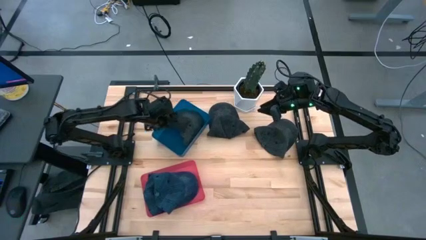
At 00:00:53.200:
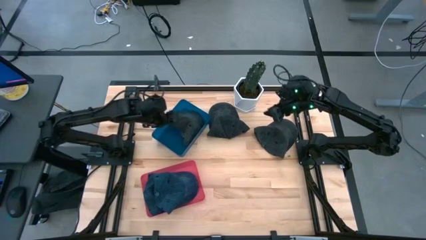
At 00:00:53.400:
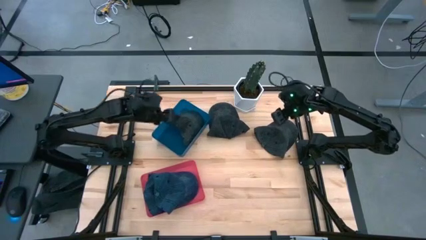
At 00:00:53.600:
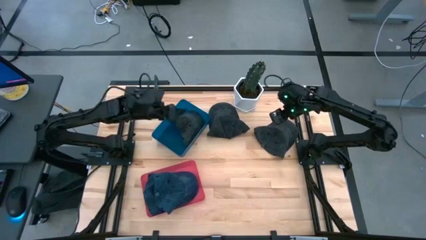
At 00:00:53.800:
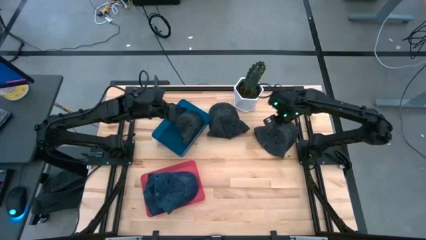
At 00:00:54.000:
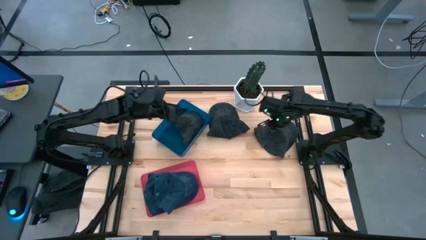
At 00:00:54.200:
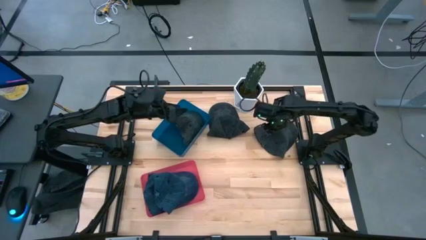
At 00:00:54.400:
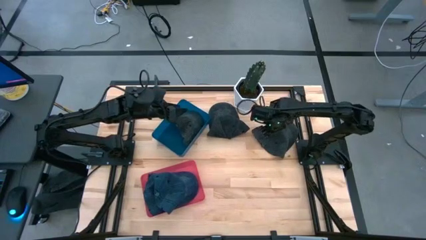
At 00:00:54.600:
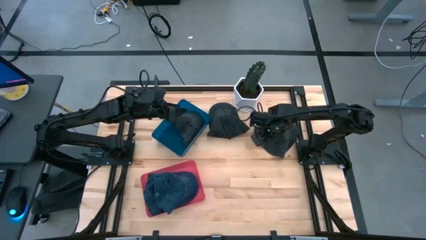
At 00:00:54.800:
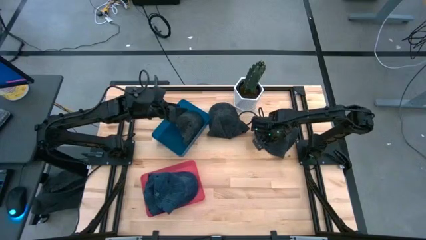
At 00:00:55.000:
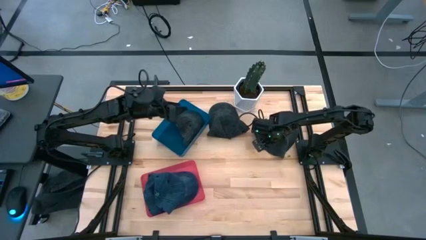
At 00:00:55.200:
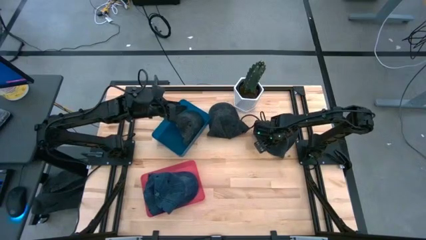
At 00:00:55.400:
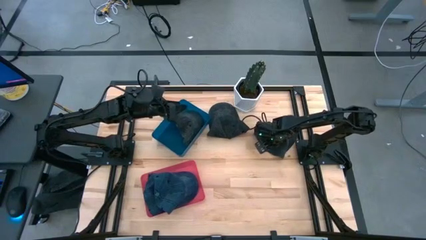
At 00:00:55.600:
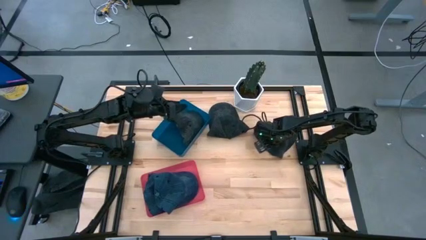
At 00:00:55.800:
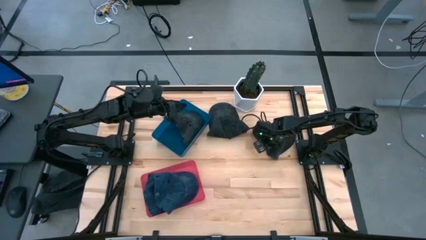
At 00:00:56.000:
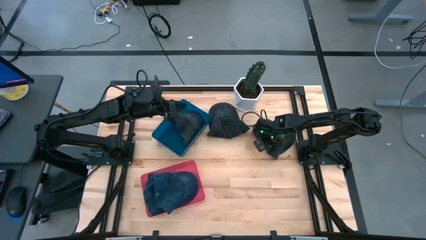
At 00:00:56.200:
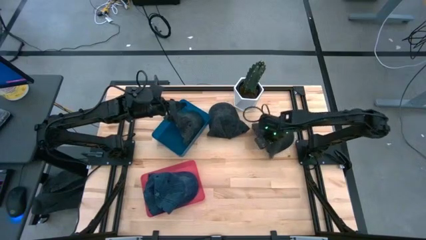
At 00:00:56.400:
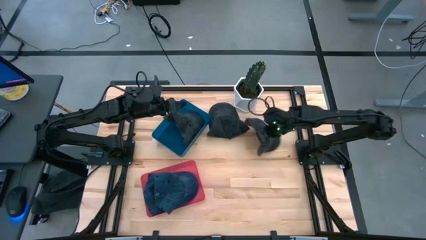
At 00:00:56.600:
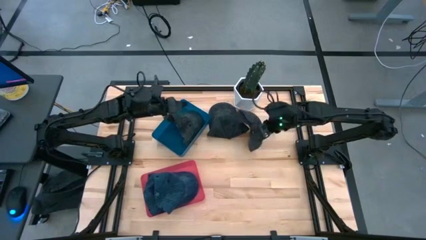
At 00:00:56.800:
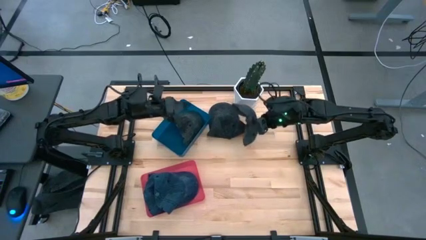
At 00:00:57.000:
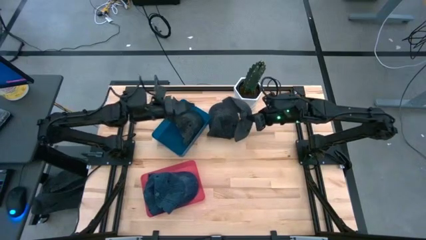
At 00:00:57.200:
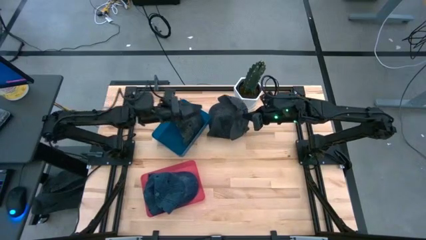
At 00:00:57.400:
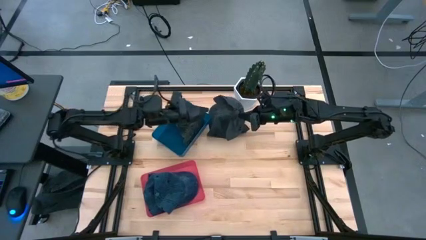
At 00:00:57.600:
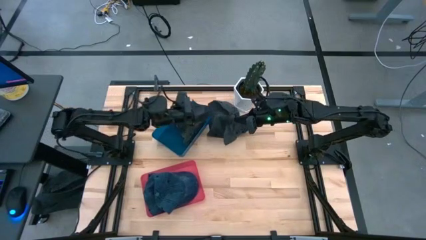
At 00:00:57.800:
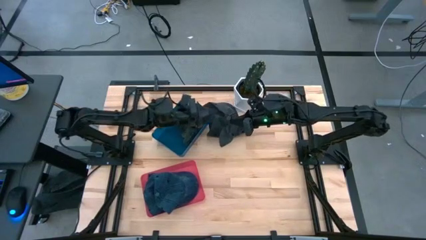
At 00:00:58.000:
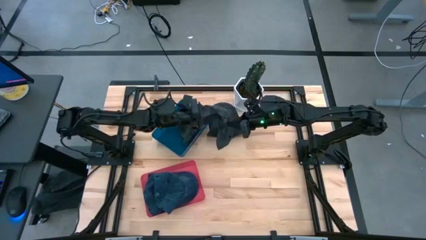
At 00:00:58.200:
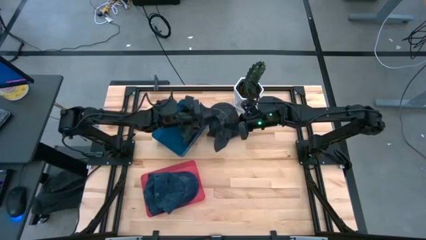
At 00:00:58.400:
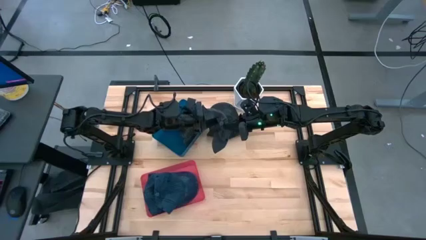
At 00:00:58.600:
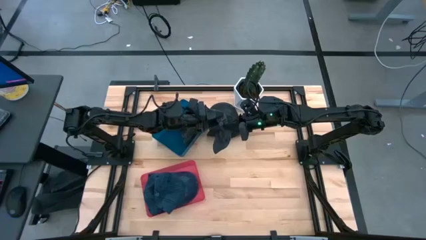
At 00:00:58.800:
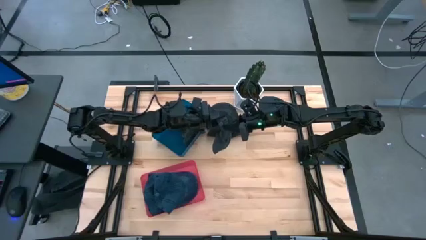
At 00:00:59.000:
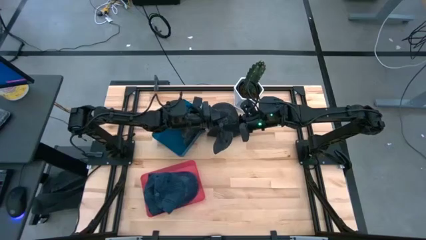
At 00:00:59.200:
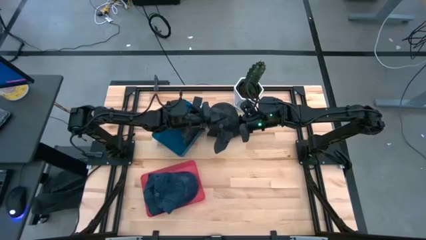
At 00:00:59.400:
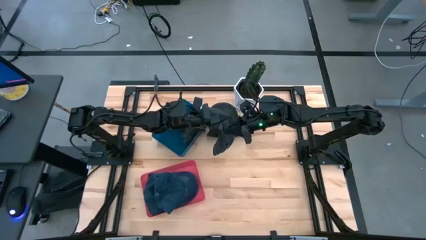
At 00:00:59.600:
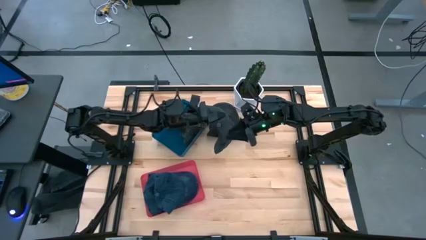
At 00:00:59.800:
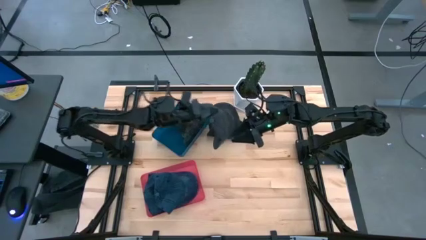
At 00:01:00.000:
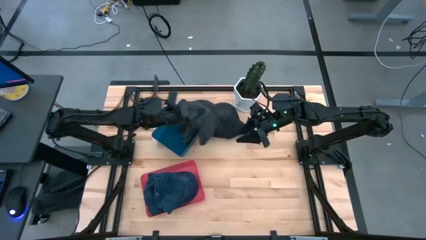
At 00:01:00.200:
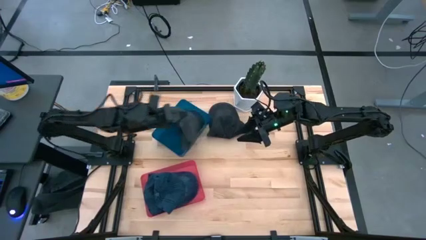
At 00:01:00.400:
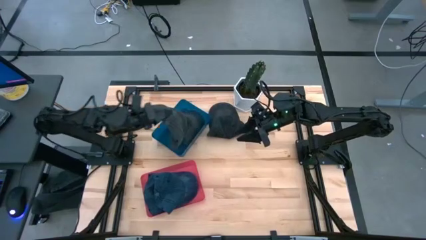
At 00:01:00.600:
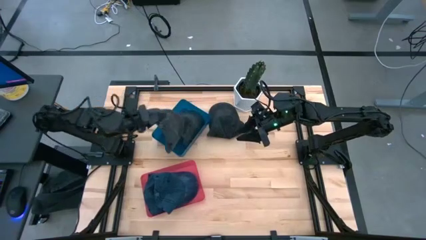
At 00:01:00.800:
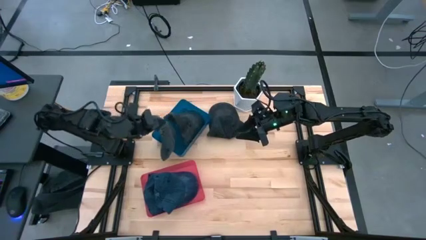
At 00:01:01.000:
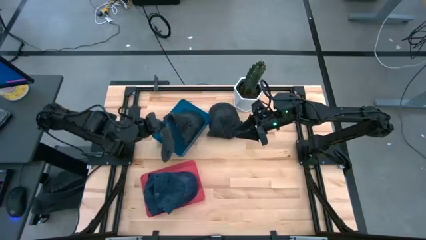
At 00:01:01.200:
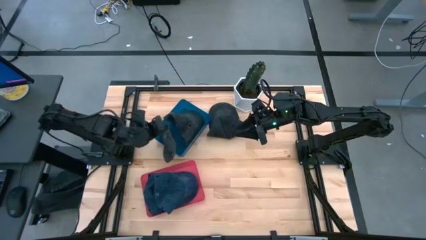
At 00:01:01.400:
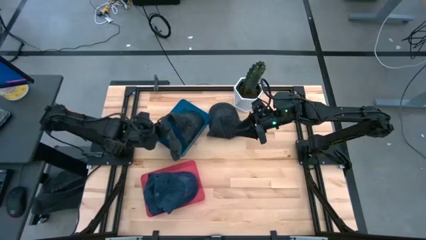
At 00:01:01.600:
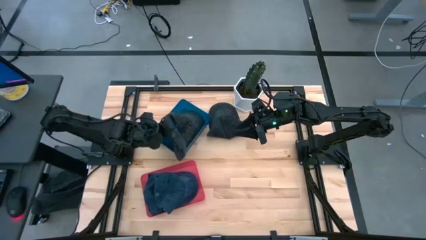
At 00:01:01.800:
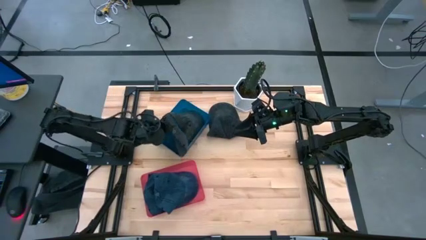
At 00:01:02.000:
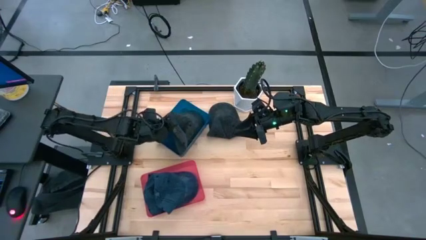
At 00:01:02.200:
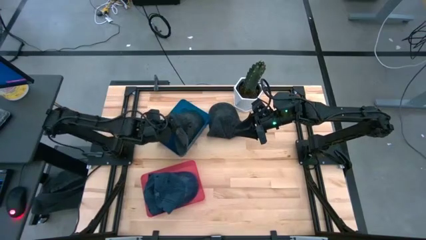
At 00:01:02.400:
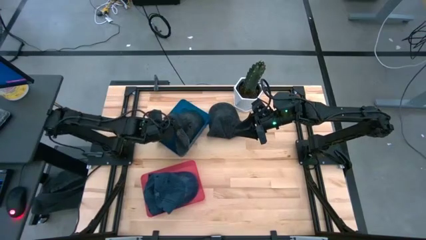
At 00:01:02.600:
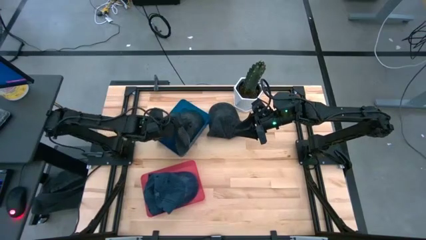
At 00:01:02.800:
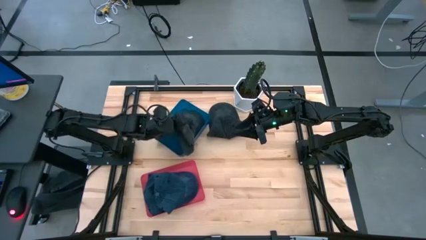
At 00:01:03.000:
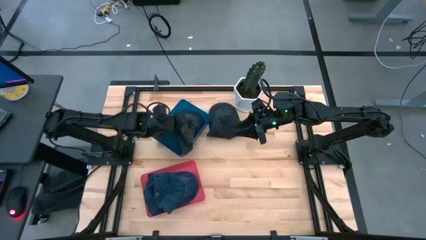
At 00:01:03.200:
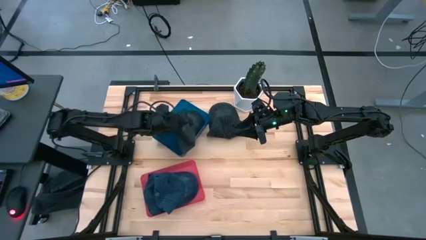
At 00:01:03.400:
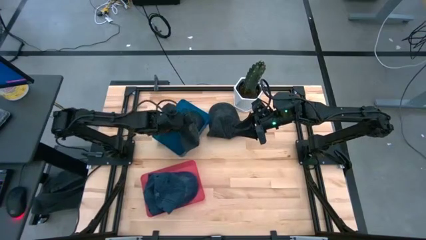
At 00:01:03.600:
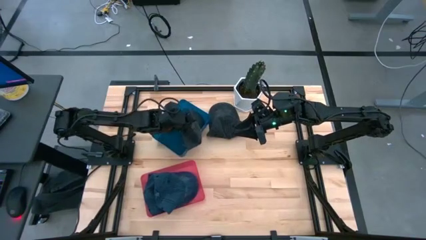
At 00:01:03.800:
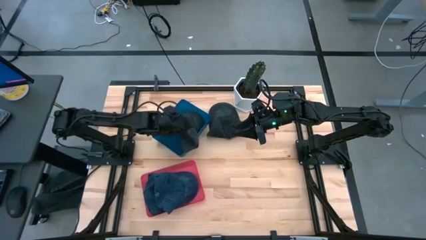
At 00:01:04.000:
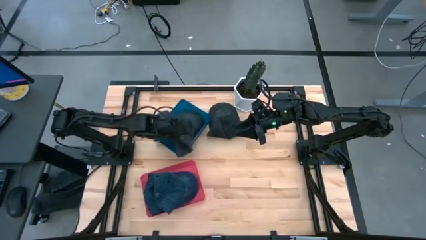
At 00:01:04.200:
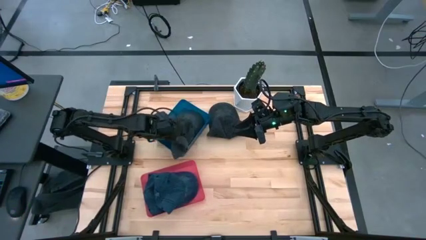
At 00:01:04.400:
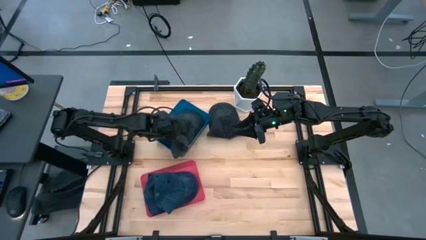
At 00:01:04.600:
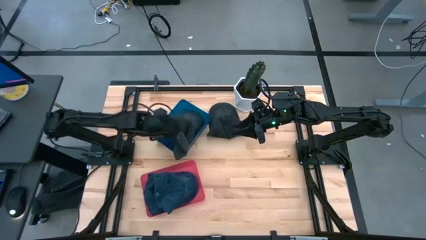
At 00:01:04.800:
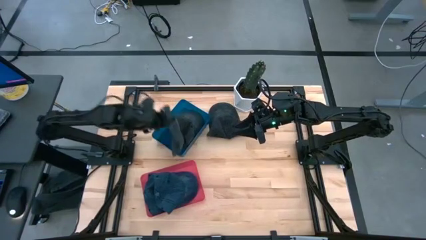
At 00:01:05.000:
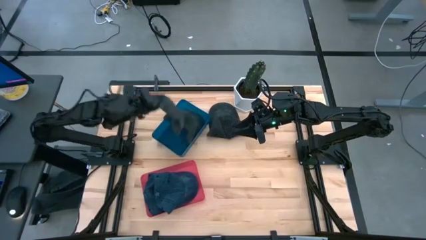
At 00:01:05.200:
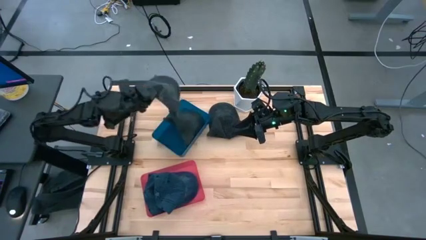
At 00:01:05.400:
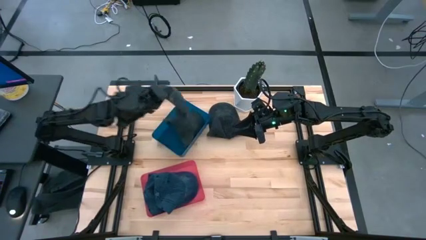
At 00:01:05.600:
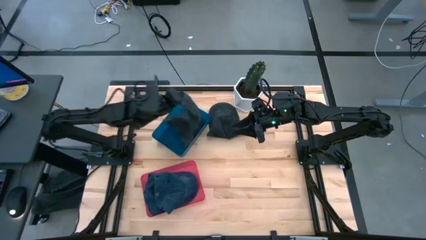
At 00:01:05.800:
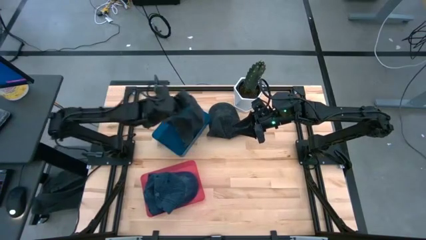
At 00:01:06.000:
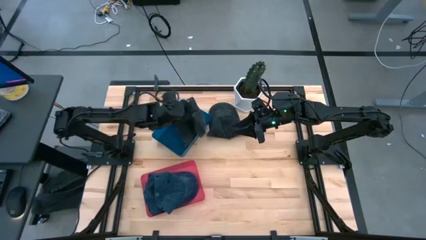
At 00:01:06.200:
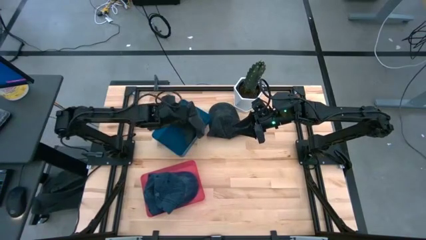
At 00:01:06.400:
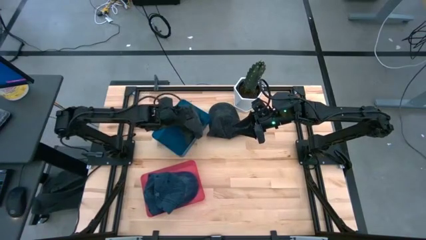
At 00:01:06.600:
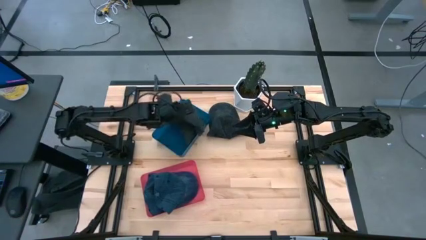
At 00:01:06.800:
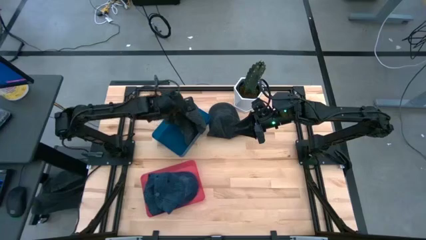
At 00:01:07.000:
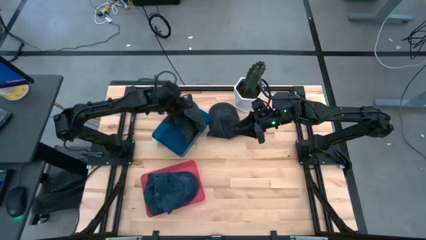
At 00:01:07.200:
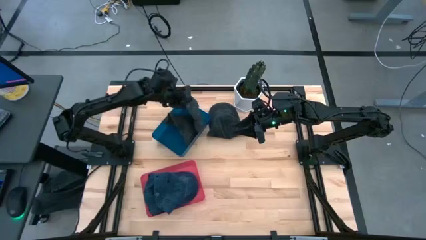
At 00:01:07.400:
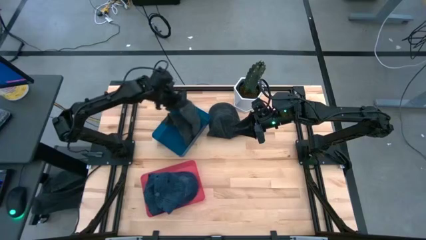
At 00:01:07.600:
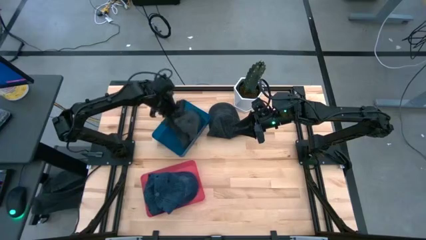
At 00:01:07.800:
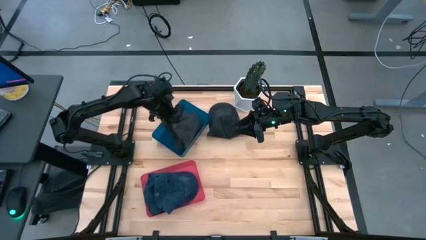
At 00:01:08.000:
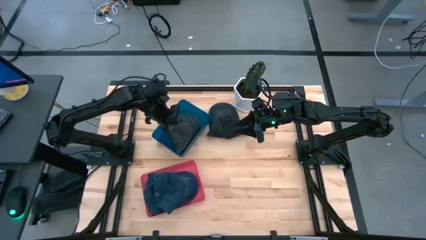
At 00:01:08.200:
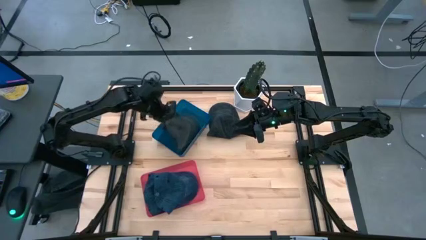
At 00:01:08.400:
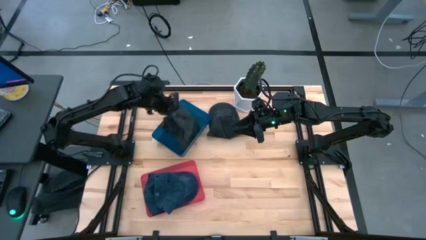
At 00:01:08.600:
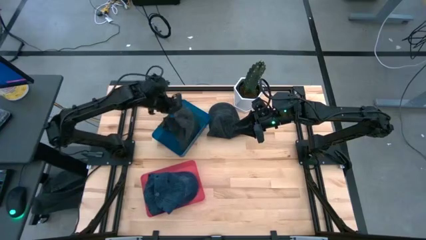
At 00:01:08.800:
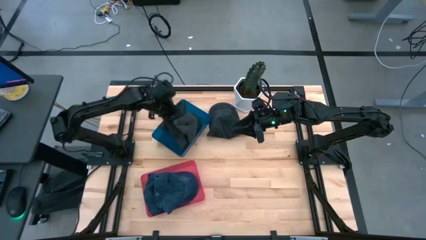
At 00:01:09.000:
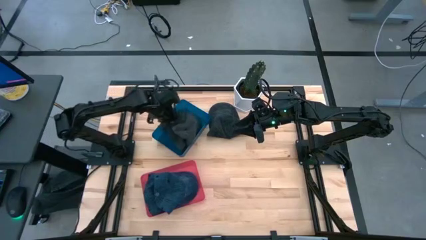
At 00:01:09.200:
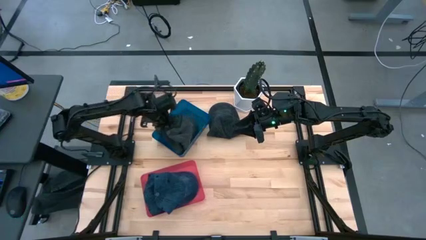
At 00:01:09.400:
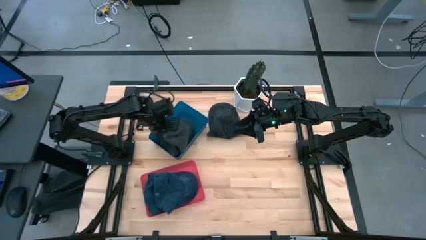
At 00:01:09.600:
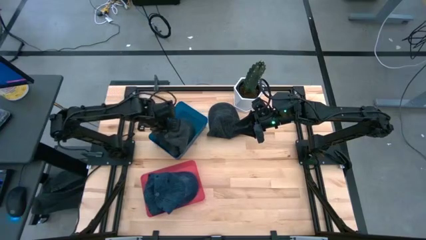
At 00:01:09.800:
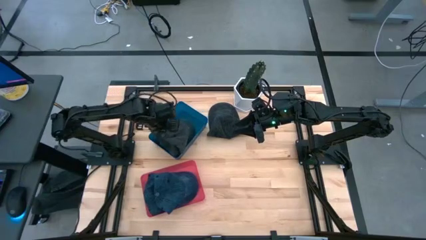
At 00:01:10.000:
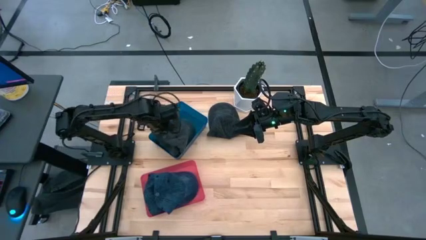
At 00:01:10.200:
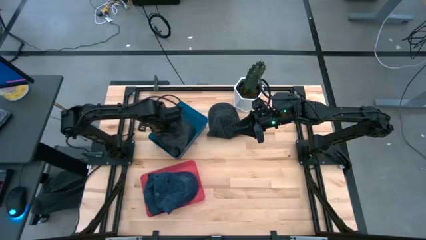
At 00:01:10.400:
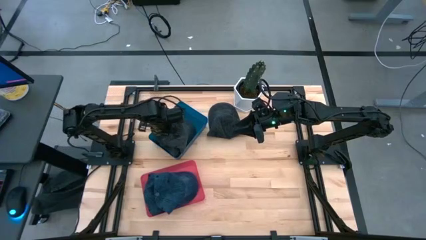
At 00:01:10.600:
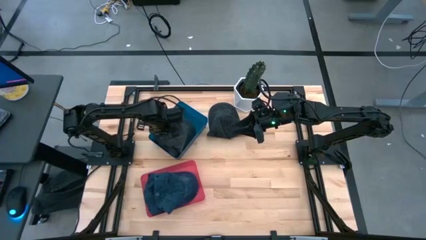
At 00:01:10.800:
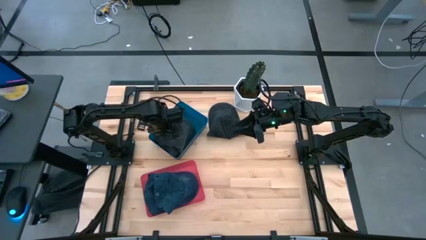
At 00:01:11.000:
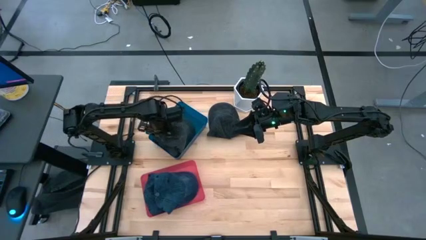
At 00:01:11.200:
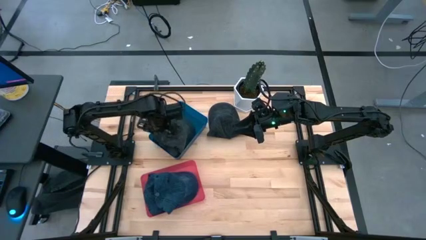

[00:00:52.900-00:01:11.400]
Task: Pick & Place hat
Put the right black cap into the blue bin
